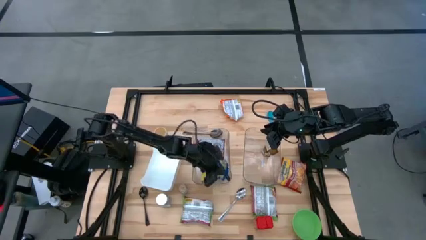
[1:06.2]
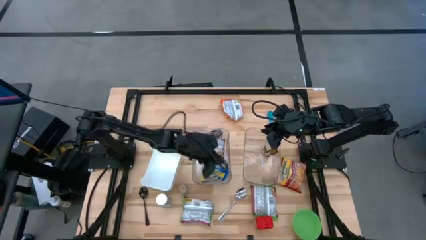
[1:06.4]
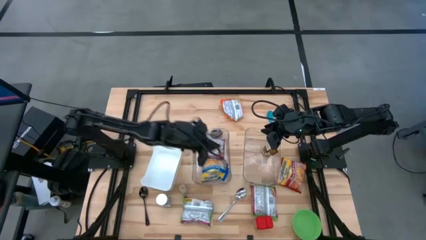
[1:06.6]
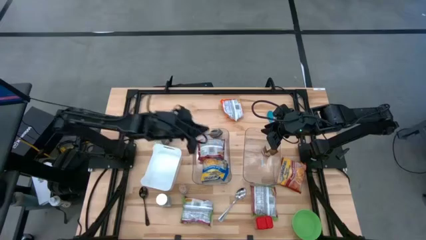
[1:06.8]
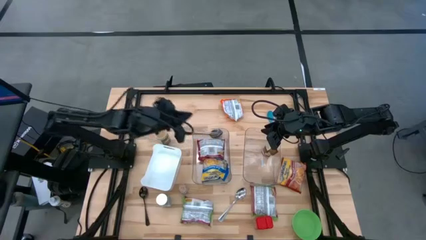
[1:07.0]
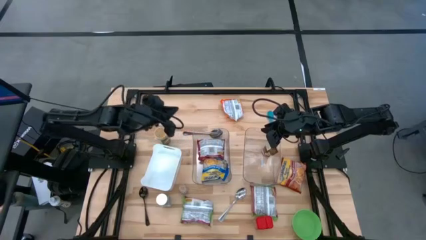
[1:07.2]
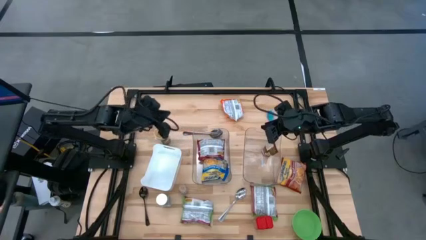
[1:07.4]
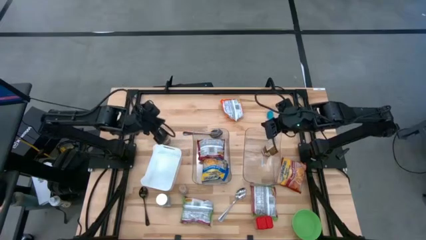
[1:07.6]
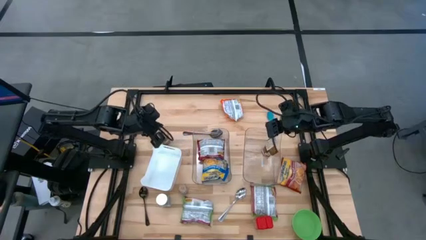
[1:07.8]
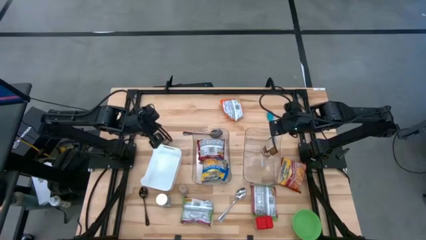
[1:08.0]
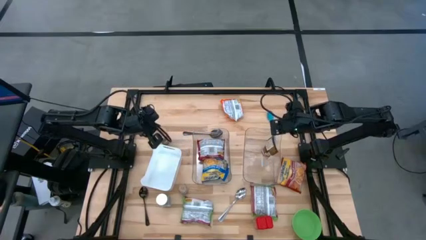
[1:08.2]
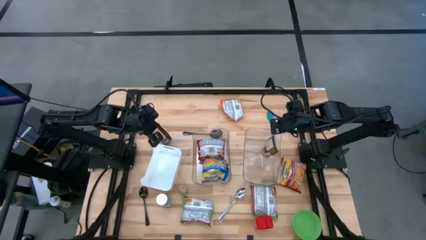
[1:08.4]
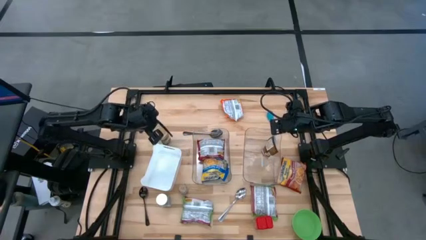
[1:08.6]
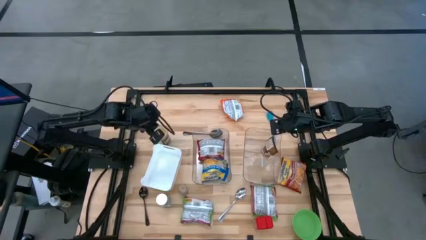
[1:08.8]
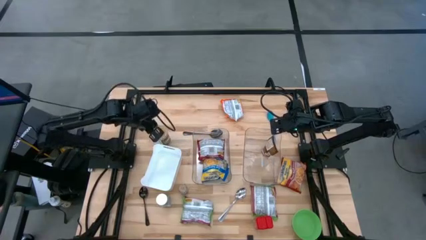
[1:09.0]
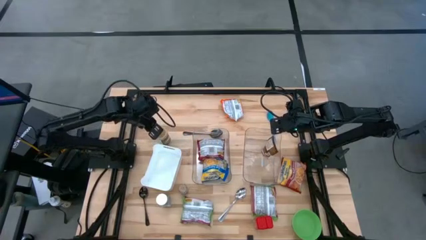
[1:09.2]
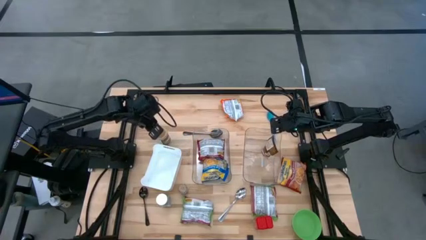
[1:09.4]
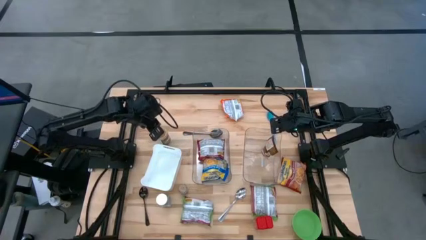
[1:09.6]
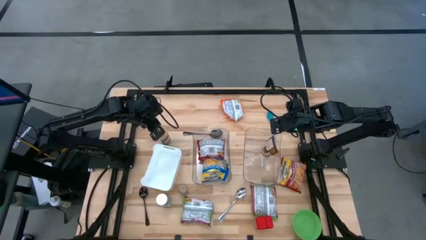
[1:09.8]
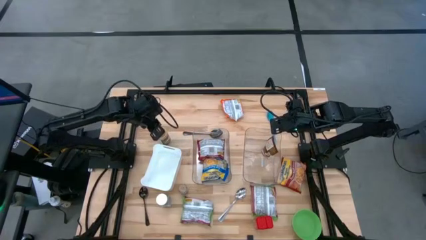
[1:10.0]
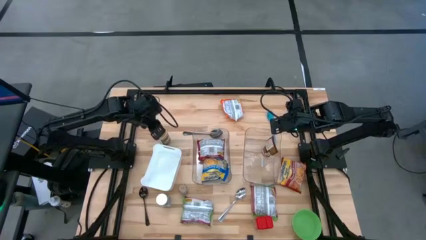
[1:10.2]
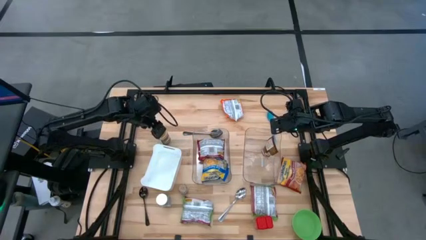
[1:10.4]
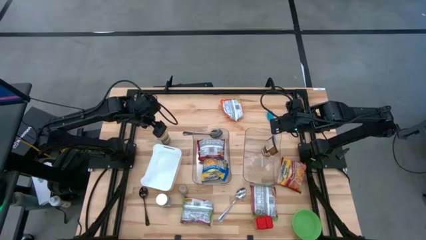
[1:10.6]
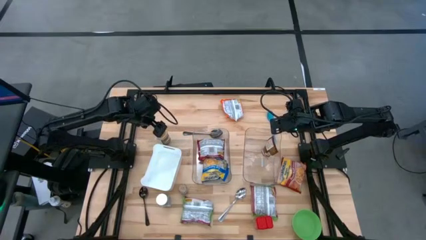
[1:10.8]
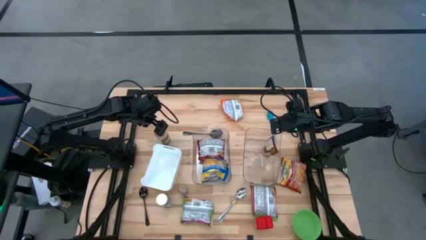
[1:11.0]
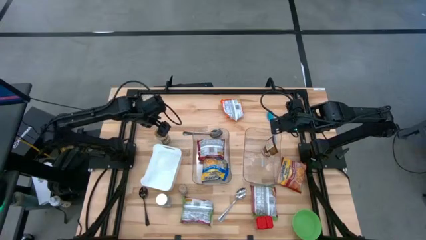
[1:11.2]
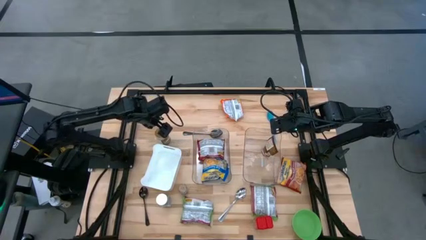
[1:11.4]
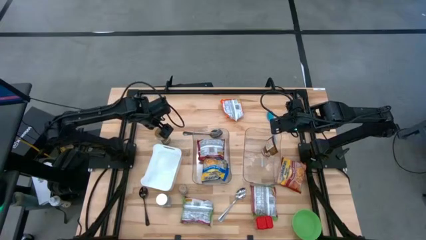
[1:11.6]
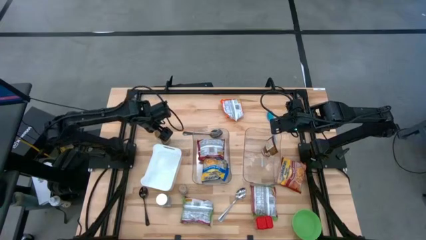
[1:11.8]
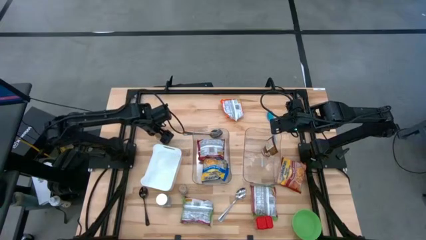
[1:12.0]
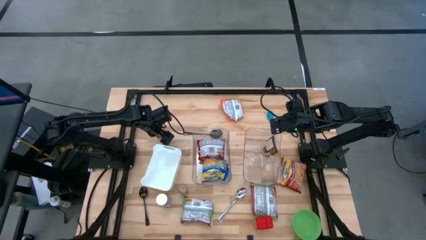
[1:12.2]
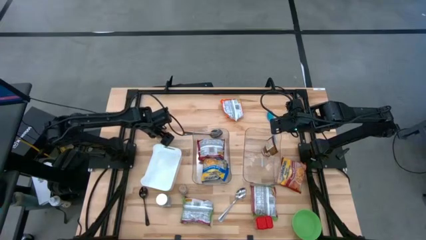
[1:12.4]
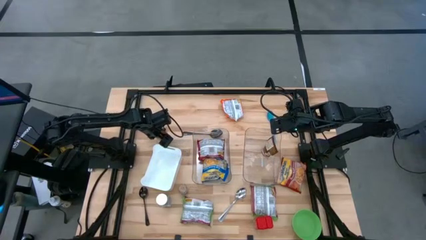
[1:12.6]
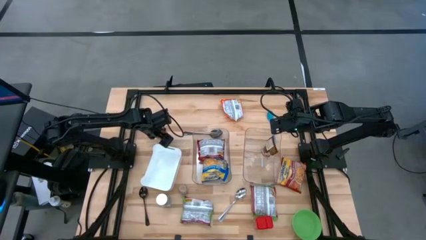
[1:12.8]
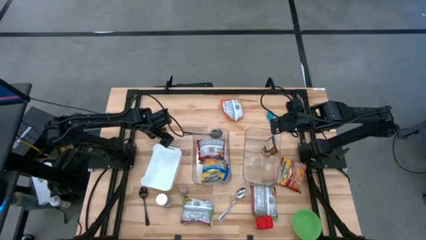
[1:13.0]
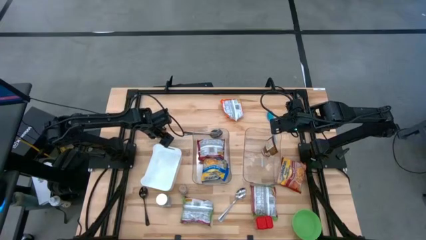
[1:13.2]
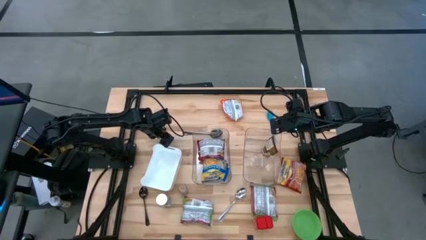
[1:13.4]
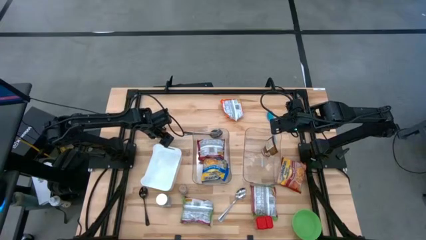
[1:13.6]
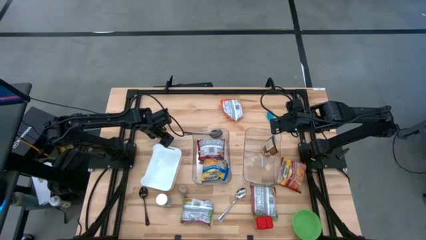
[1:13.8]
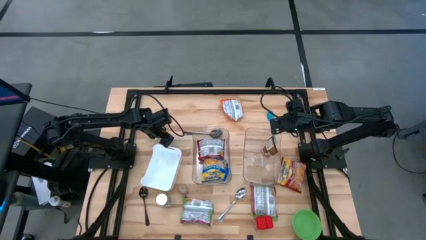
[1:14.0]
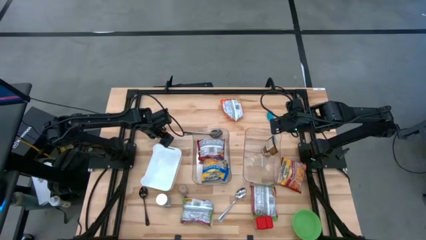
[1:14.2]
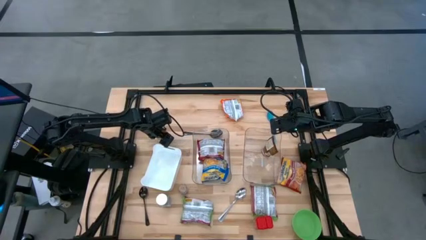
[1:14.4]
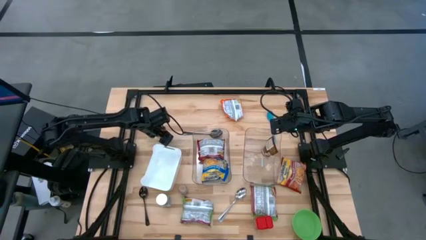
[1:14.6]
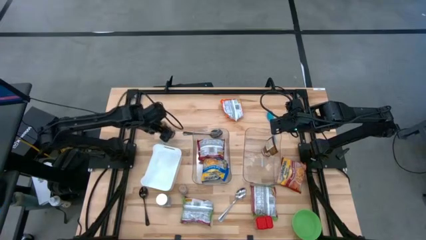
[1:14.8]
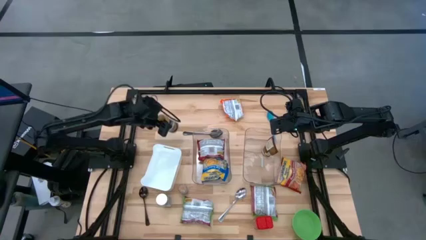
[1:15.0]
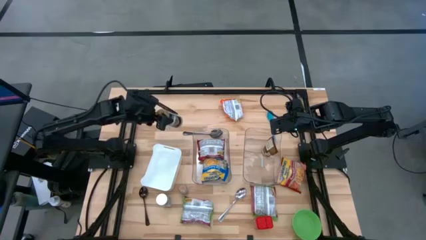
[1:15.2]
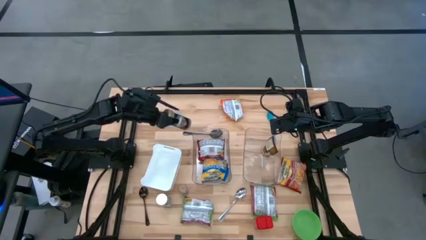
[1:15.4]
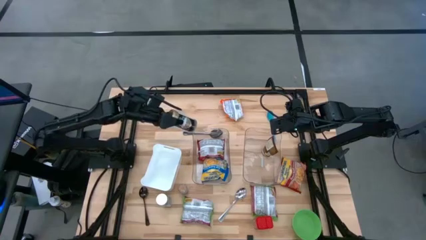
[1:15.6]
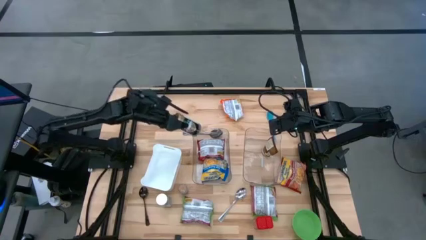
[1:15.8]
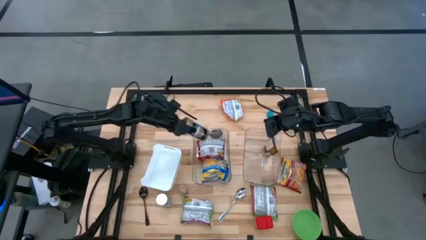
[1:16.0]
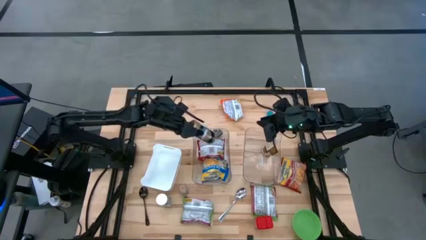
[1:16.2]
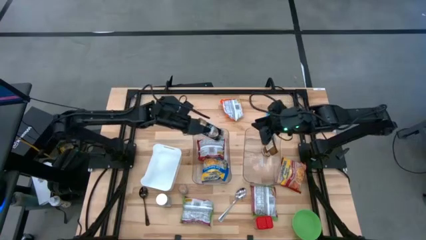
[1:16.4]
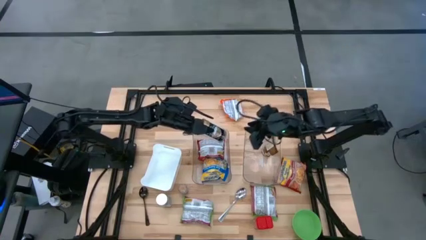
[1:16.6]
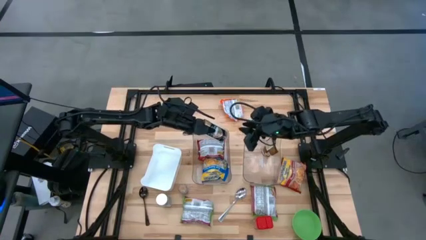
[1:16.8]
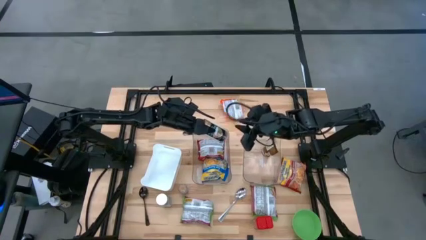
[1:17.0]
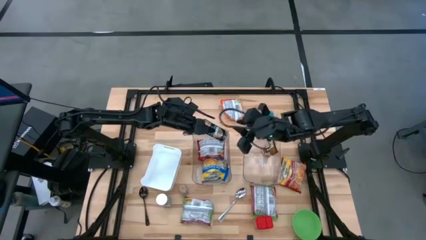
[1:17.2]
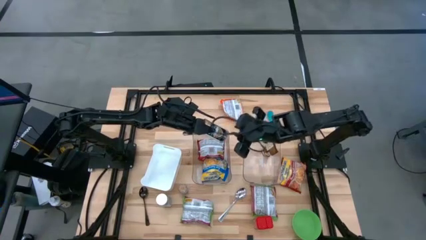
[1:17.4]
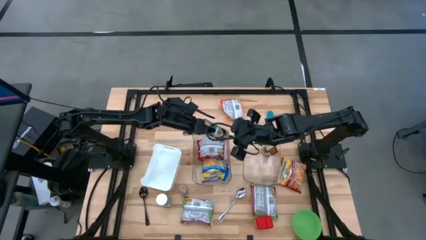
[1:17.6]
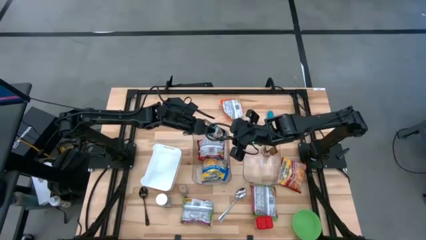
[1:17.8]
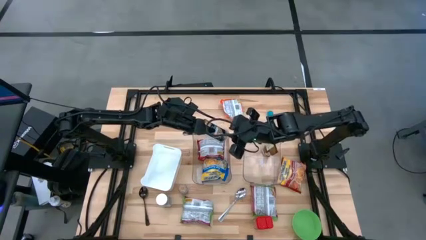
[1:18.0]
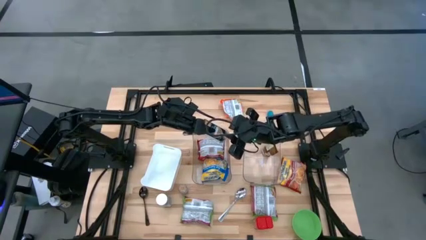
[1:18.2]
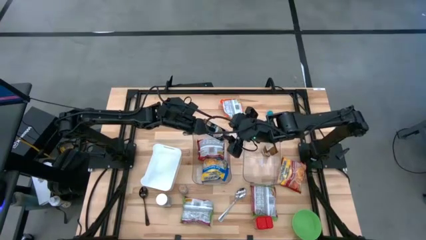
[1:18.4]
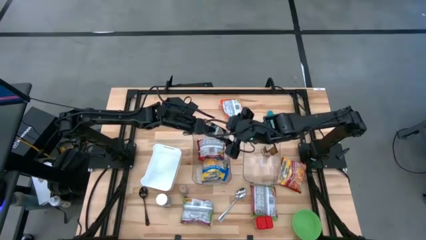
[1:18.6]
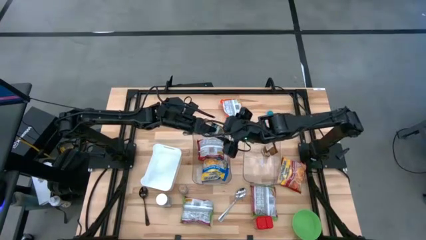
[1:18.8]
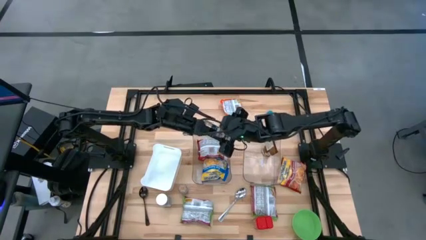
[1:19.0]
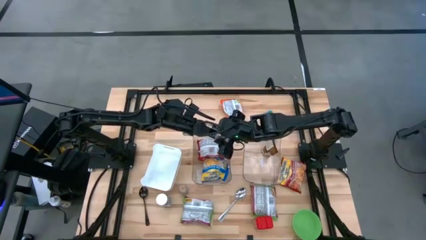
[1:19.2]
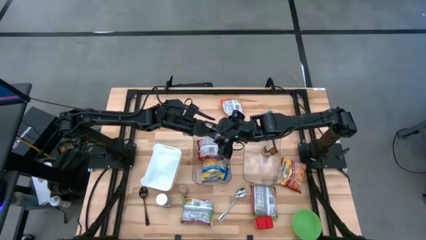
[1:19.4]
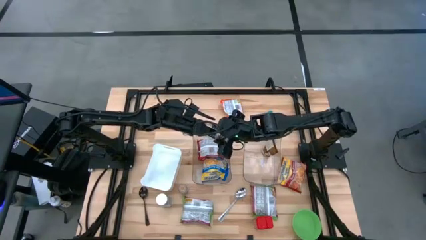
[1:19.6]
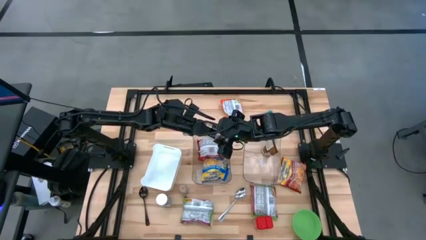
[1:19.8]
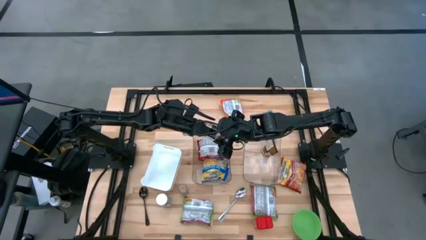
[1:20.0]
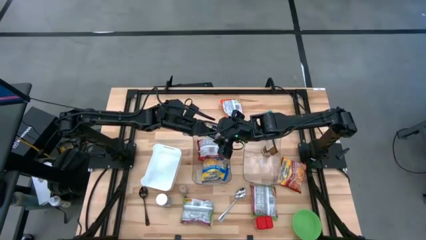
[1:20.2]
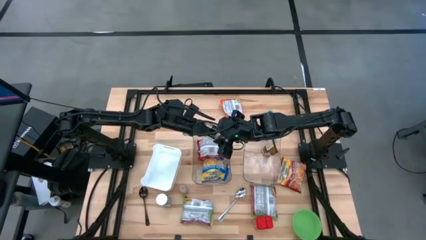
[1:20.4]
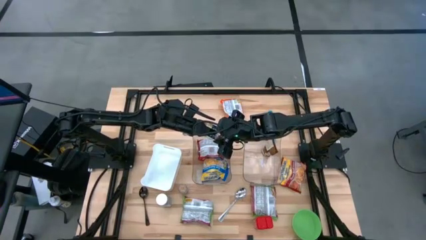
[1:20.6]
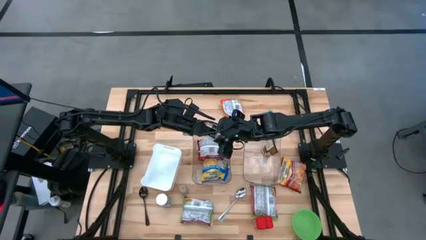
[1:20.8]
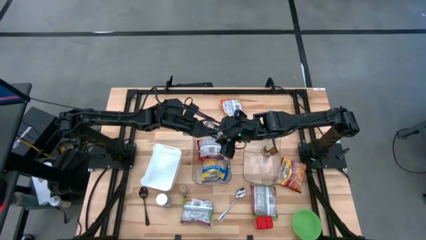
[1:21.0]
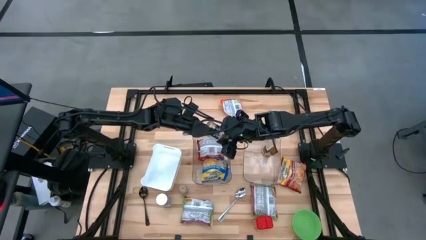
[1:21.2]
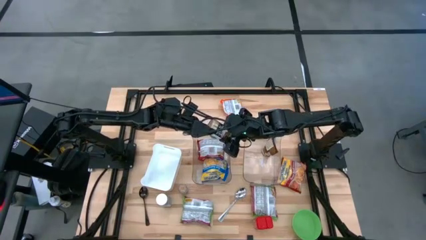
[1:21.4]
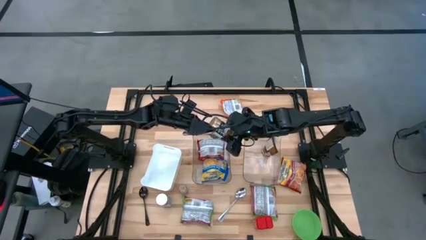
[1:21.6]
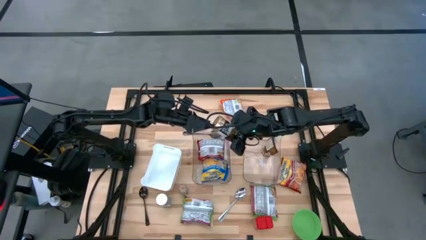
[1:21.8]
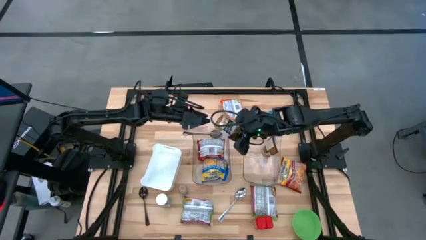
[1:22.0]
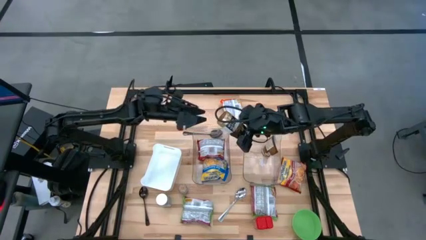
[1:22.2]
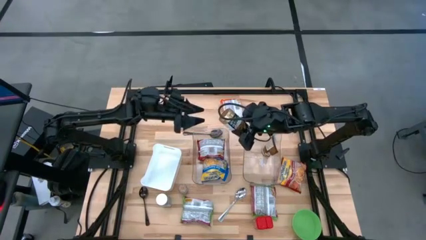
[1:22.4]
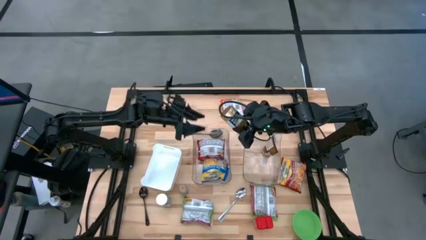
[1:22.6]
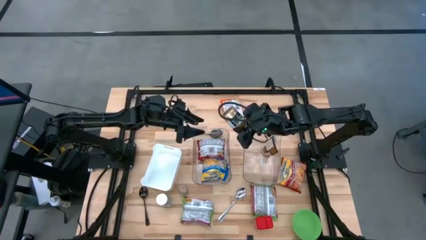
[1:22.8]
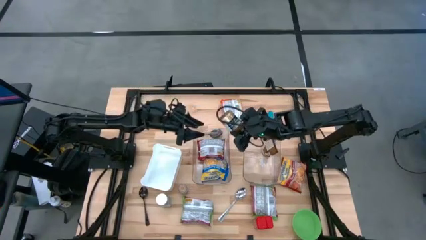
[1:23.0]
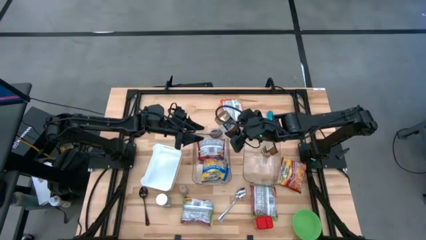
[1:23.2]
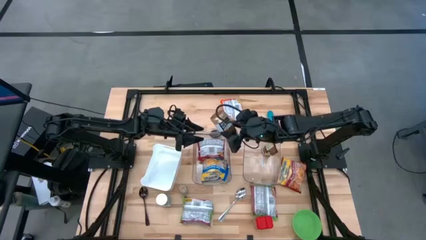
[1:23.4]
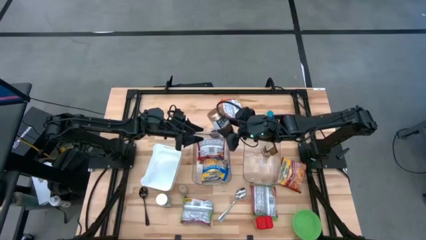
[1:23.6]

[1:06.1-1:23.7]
Task: Pick & Place Food Item
Put the gold spice bottle into the right transparent bin
